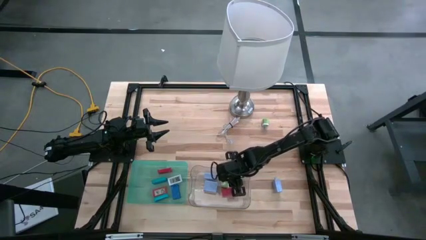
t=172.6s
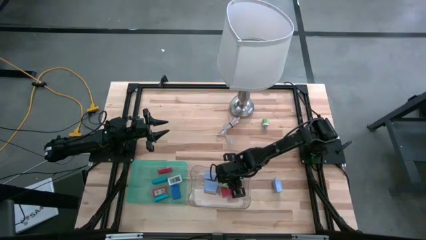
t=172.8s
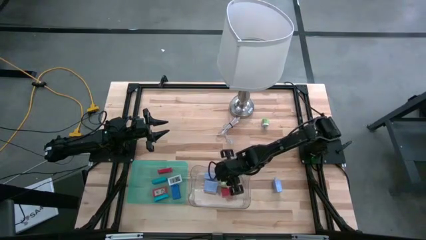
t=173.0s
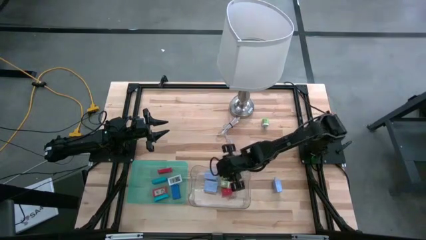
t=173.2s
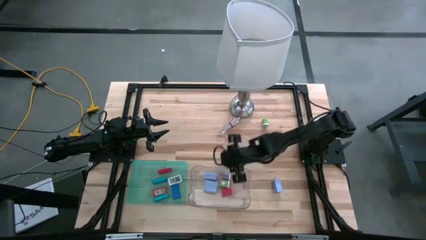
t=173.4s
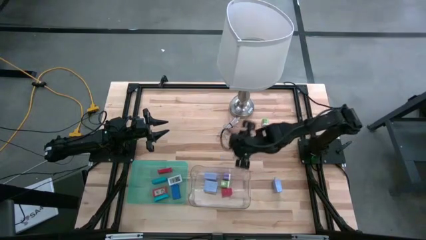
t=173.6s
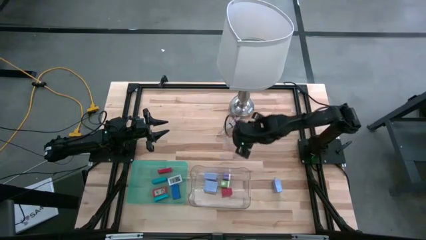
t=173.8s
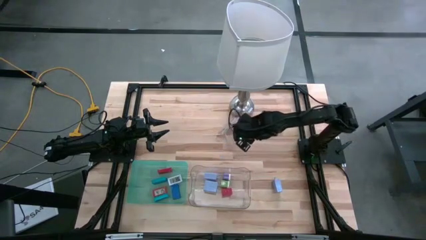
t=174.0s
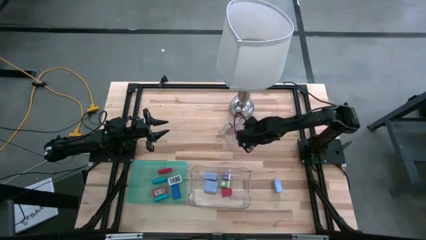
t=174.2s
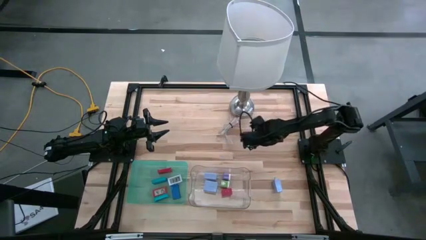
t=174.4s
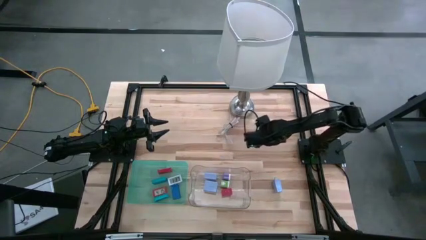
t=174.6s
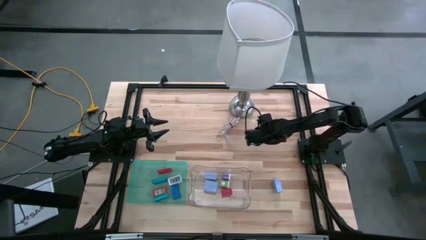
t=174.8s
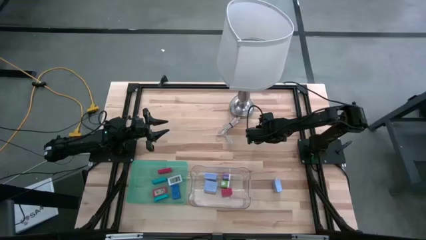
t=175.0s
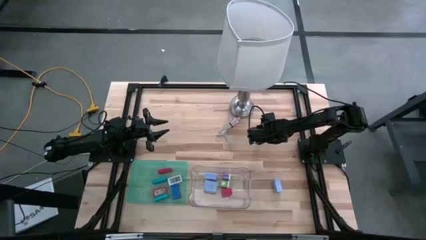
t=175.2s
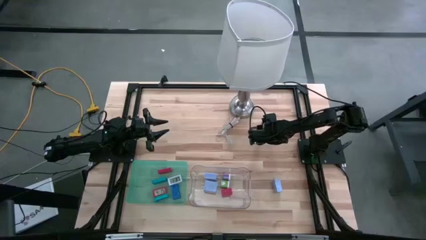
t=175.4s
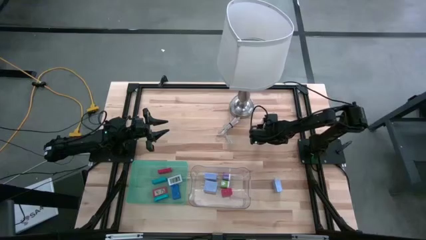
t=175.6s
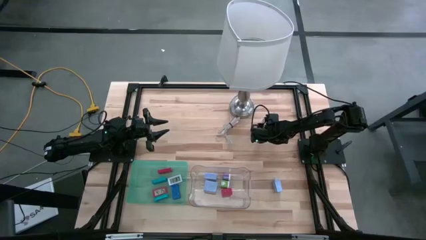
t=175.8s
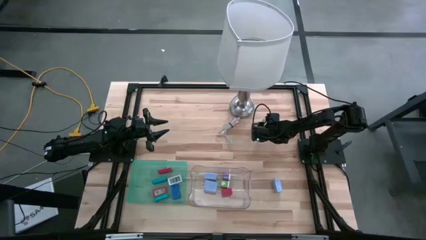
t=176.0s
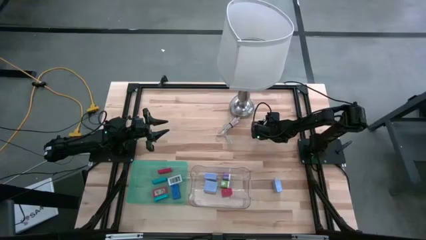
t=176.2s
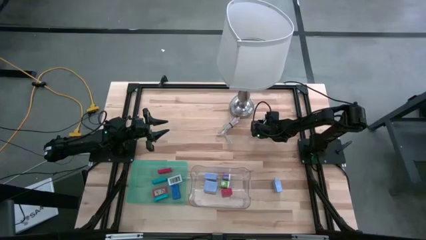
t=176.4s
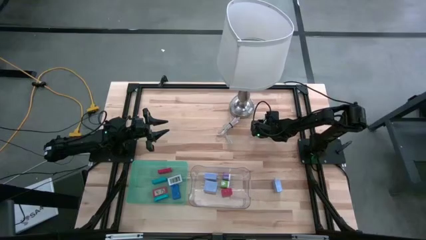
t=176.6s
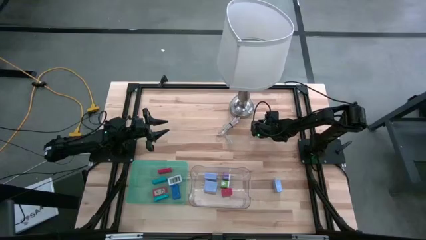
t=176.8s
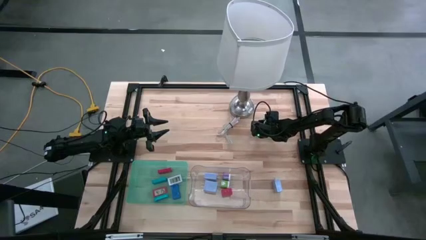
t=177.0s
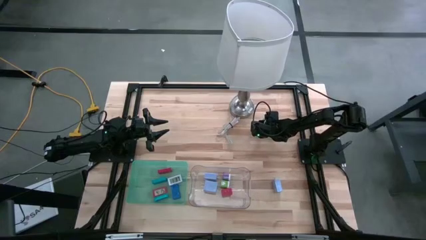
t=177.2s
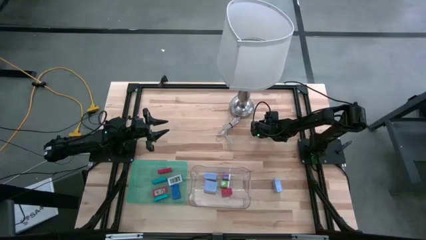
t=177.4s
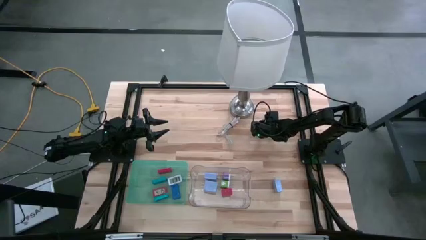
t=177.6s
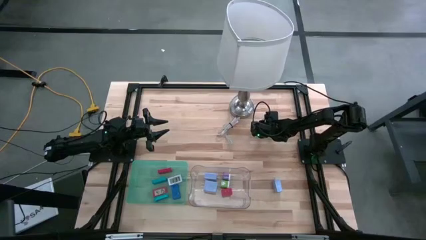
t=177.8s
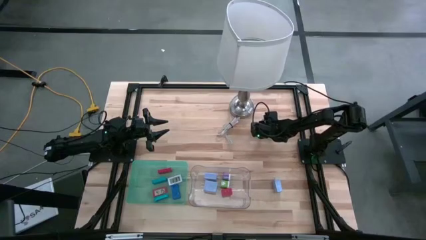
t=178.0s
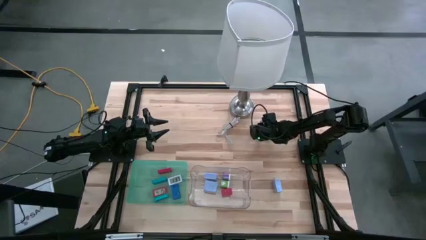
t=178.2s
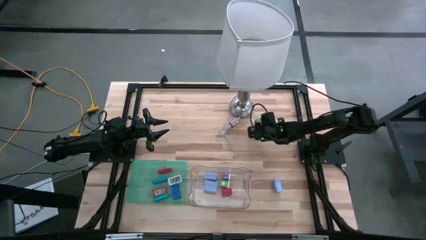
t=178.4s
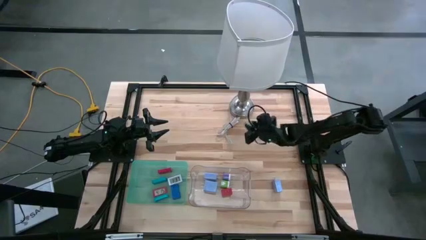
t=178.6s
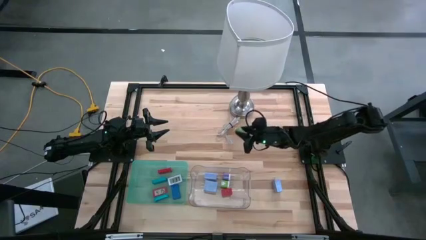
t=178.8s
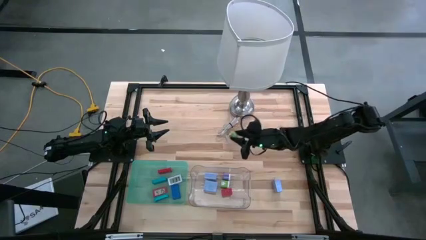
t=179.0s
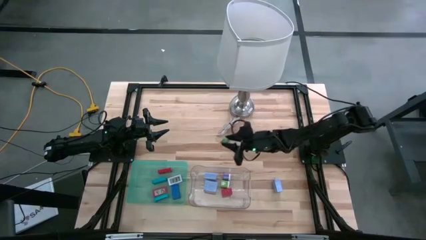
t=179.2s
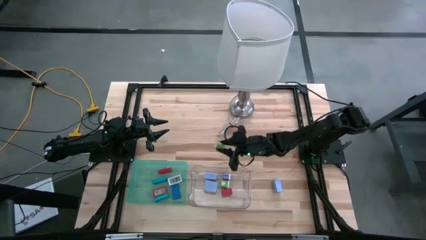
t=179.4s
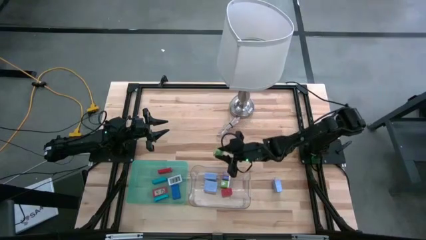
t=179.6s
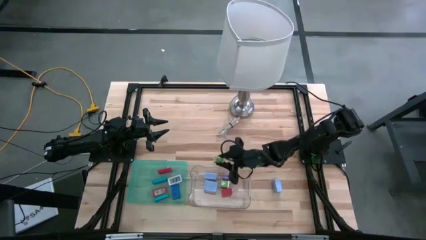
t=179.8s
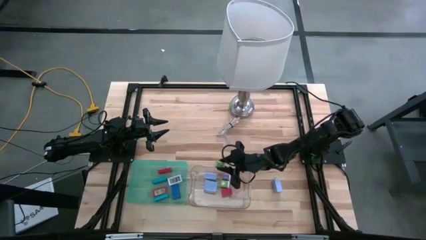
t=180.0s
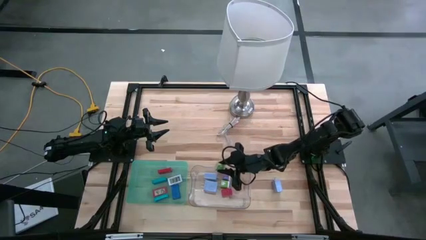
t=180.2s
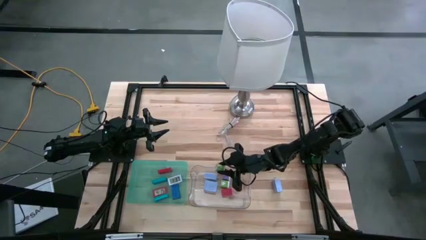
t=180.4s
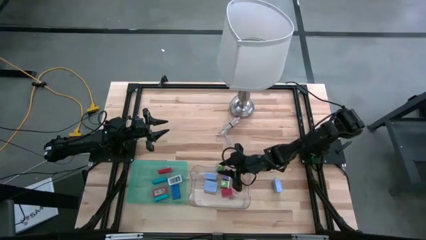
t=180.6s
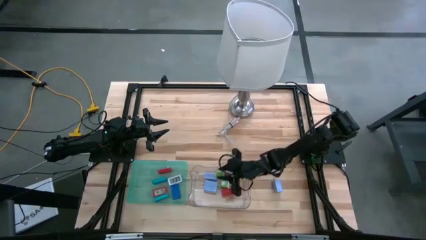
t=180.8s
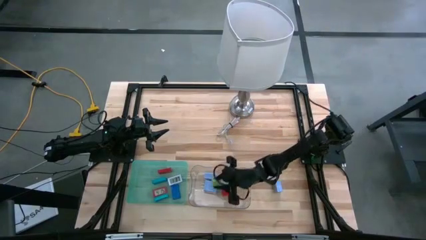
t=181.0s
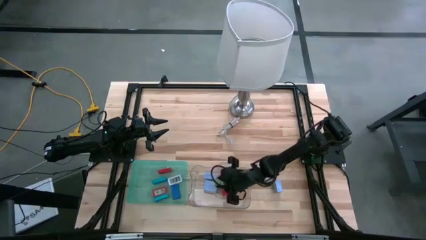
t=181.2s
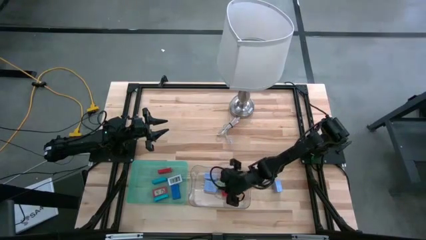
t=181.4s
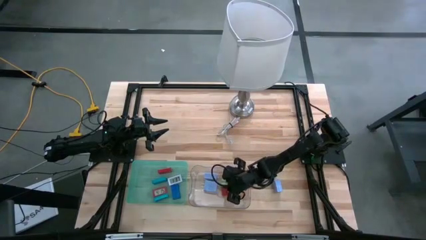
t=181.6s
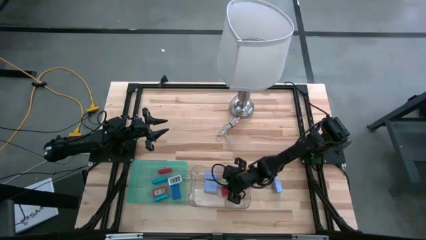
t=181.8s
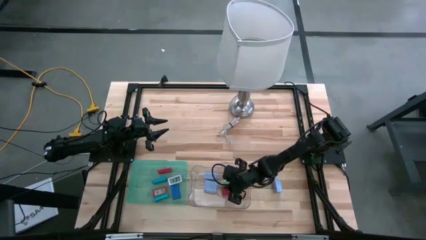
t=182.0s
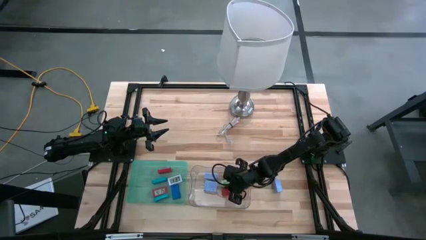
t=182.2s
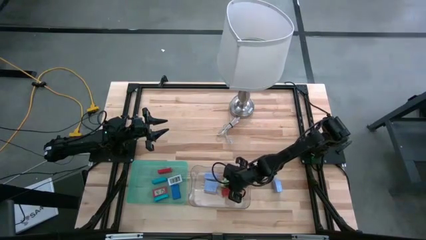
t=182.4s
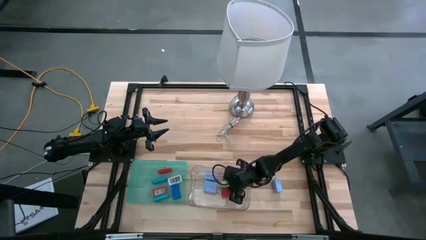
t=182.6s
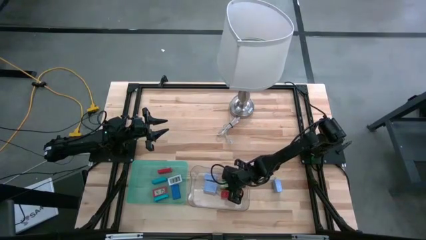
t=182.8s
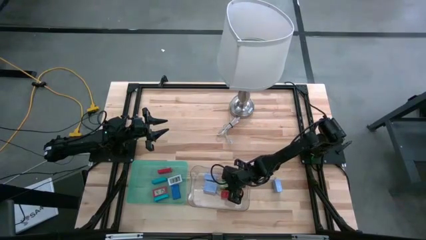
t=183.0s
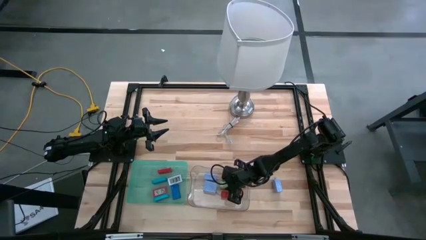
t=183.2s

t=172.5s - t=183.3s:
Task: Pick & Place Office items
Put the green charger adapter into the transparent bin

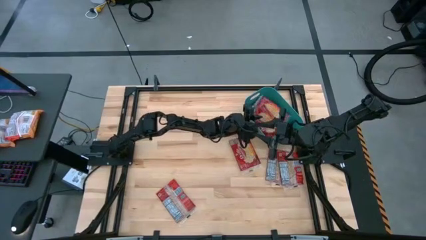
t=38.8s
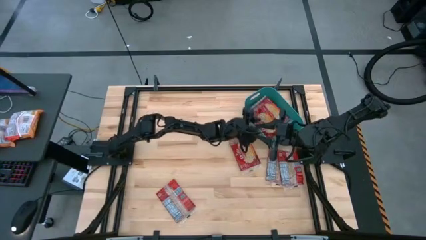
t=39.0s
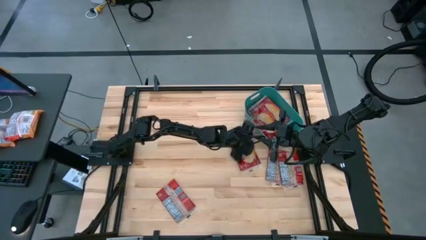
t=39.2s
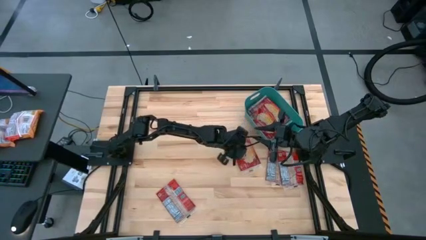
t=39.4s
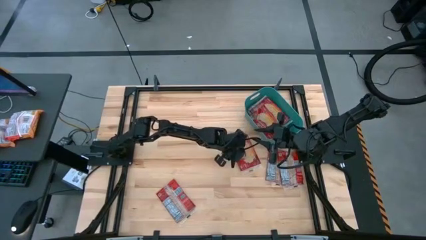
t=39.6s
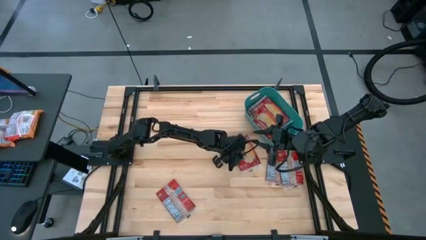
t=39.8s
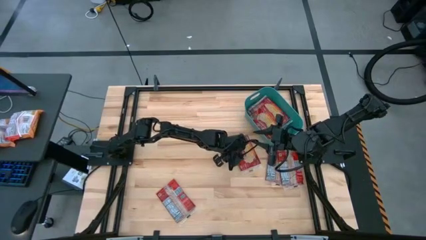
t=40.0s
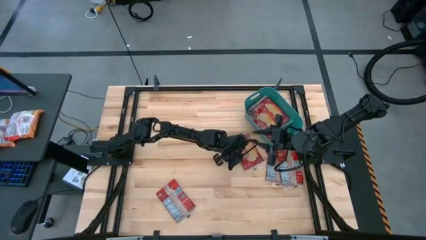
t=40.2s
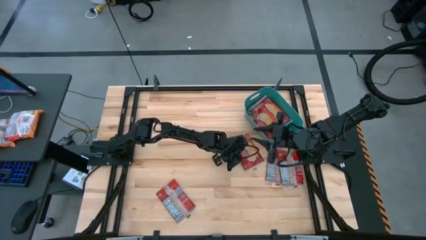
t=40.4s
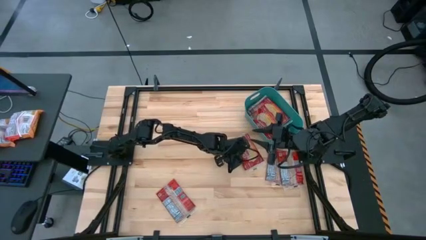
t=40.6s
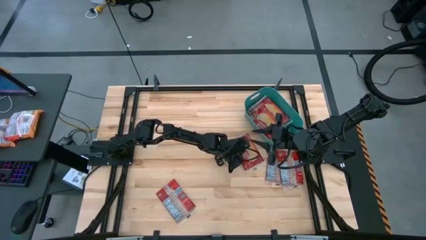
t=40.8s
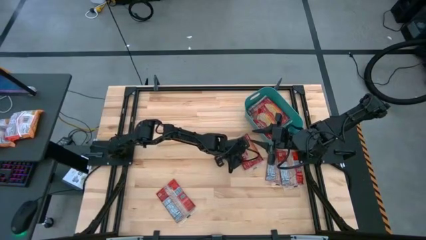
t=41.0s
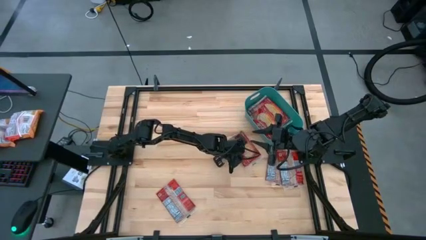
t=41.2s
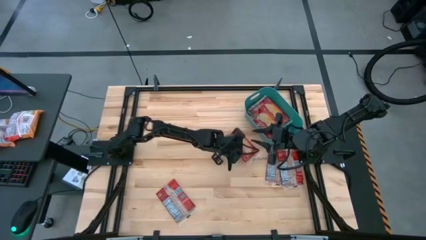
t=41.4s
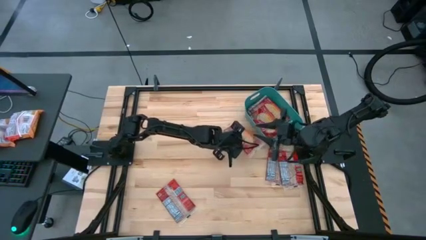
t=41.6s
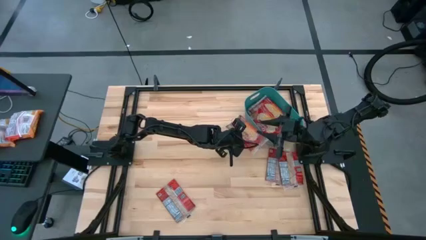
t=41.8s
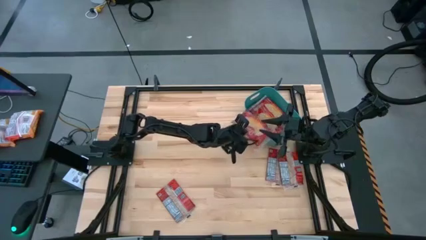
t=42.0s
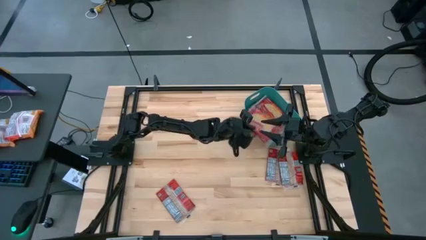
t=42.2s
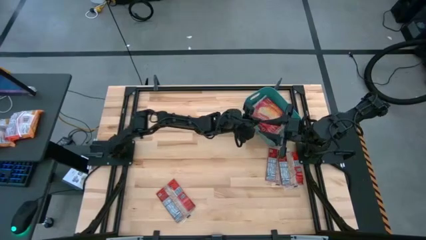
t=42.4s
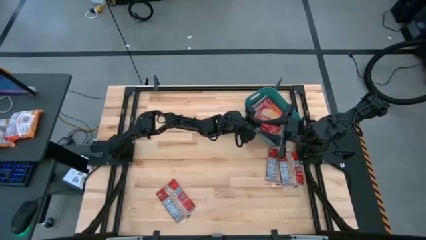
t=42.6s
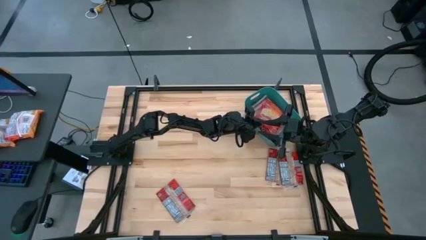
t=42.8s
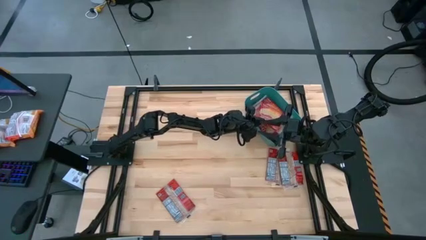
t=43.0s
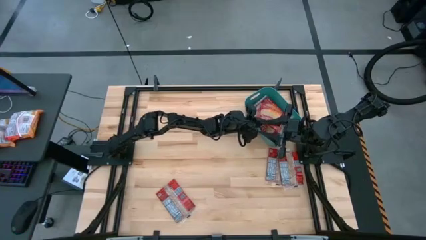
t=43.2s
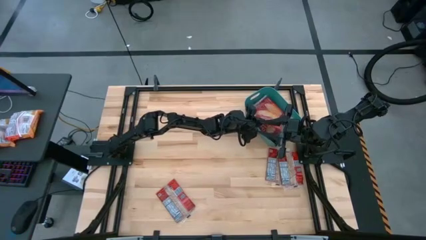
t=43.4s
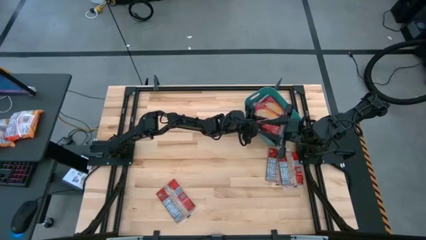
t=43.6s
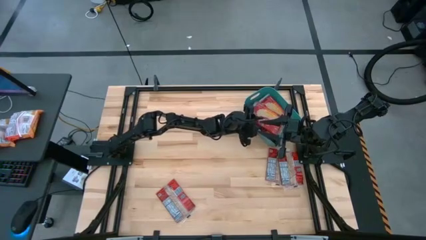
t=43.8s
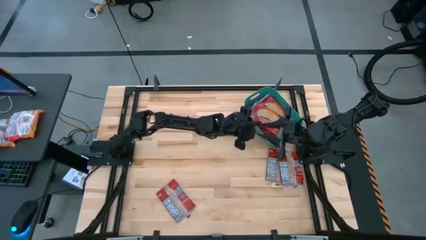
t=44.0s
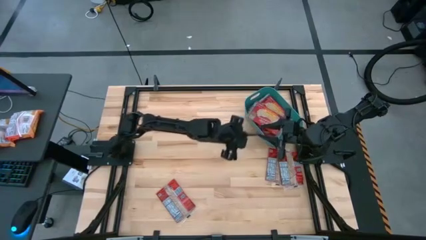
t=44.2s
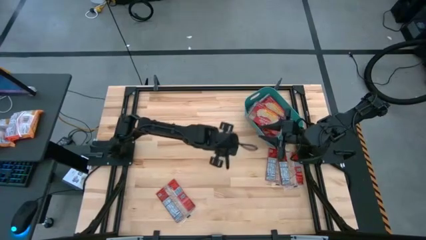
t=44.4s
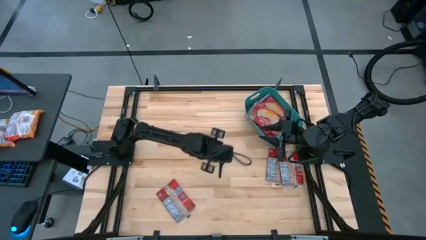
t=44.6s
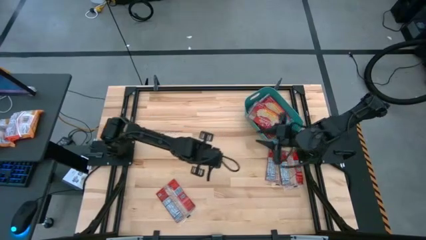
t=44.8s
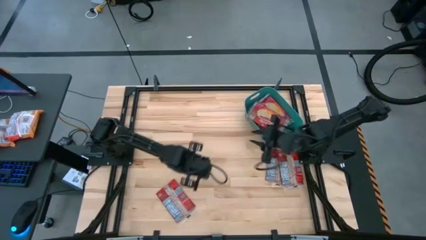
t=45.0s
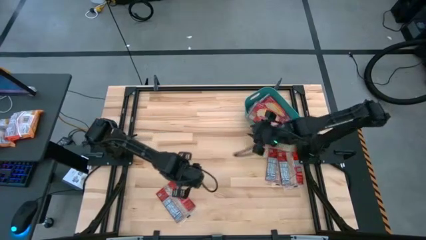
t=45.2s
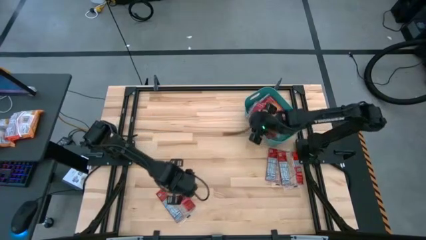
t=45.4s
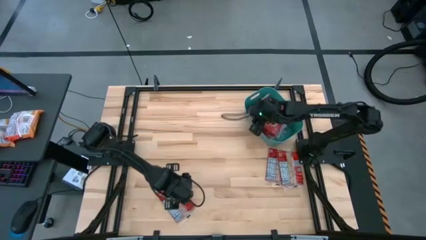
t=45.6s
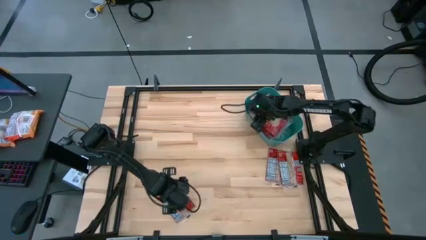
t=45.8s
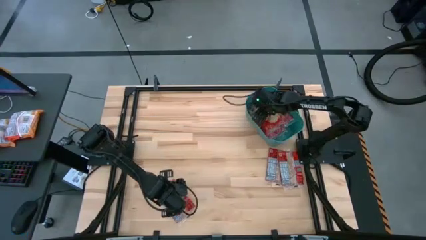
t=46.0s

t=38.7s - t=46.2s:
Task: Sort popcorn bags into baskets
Put the red popcorn bag into the green bin
